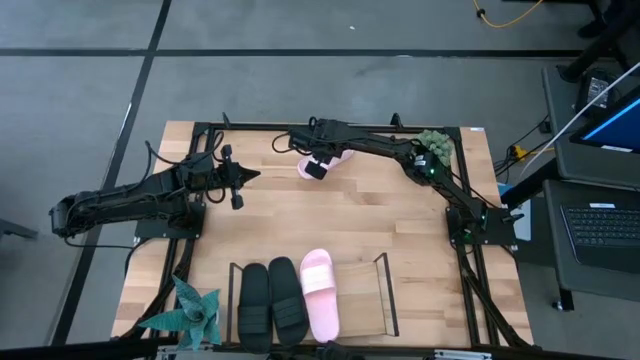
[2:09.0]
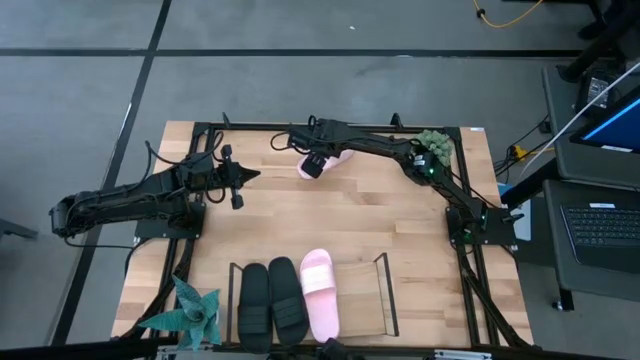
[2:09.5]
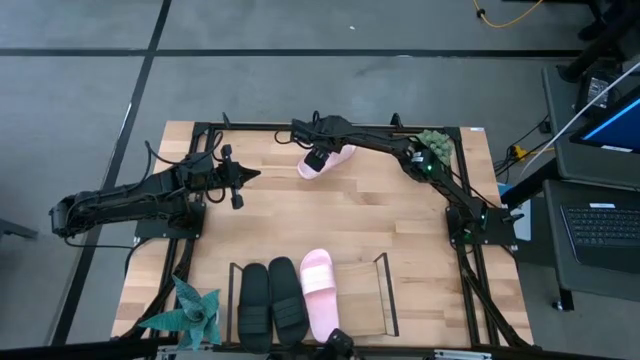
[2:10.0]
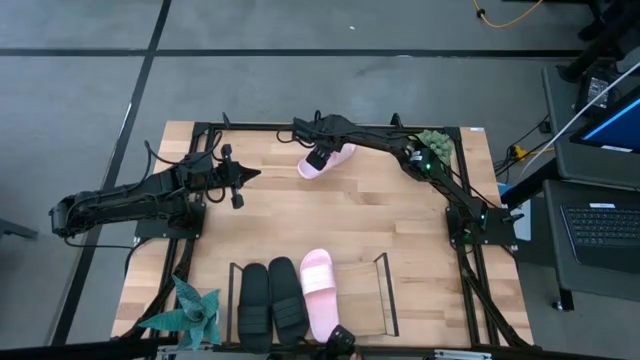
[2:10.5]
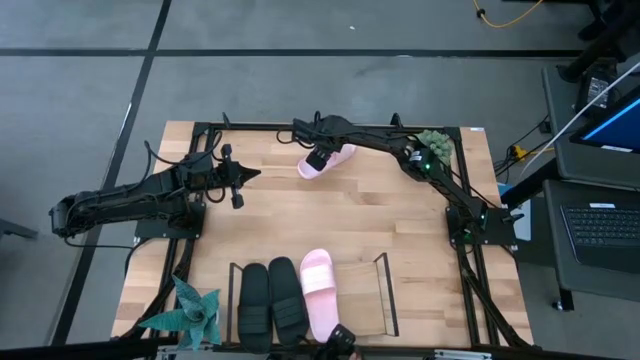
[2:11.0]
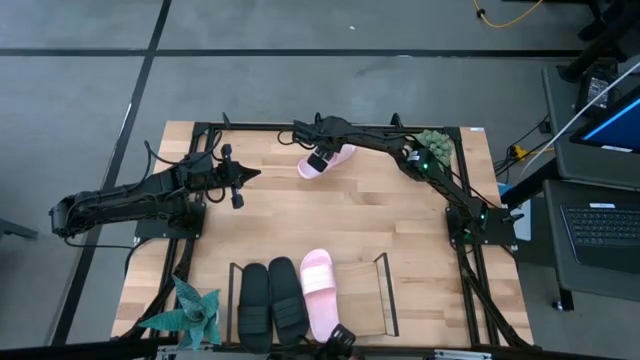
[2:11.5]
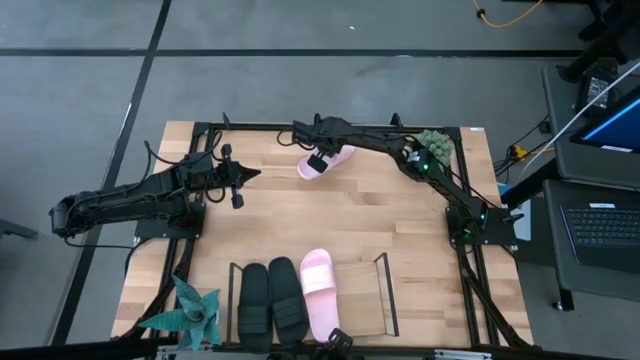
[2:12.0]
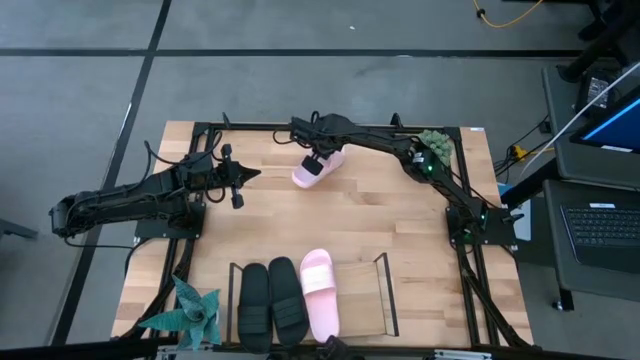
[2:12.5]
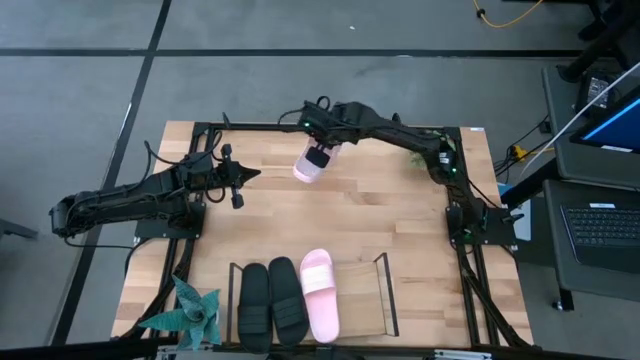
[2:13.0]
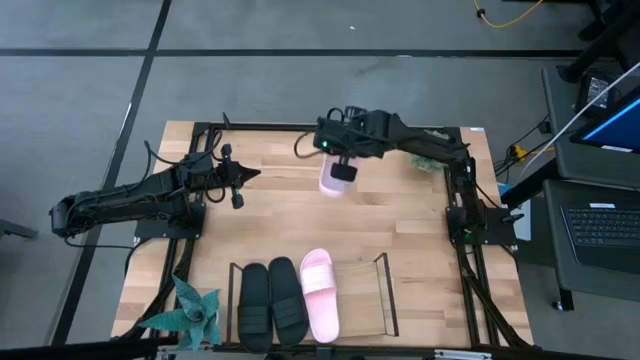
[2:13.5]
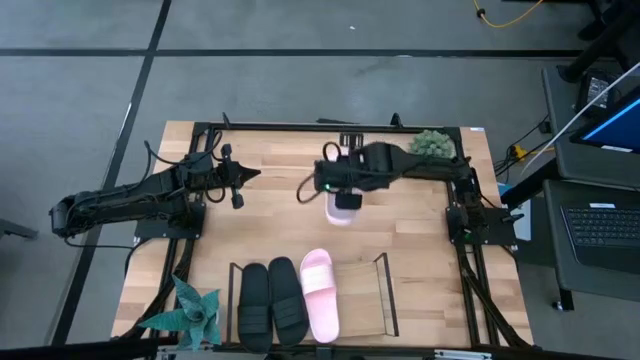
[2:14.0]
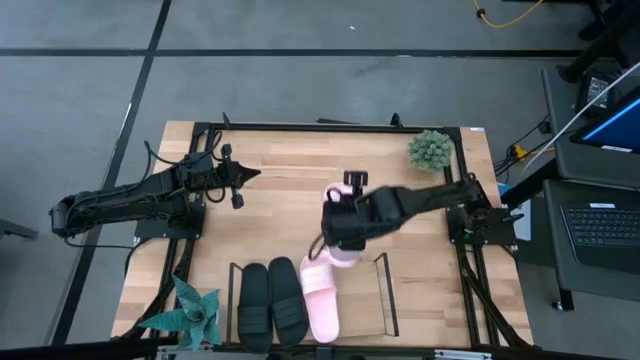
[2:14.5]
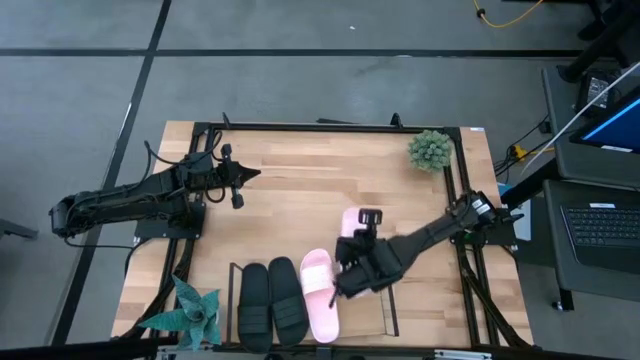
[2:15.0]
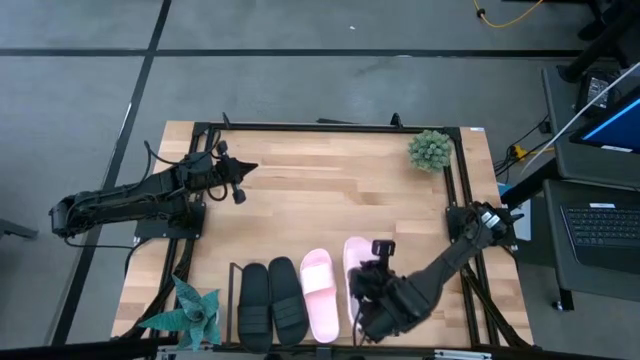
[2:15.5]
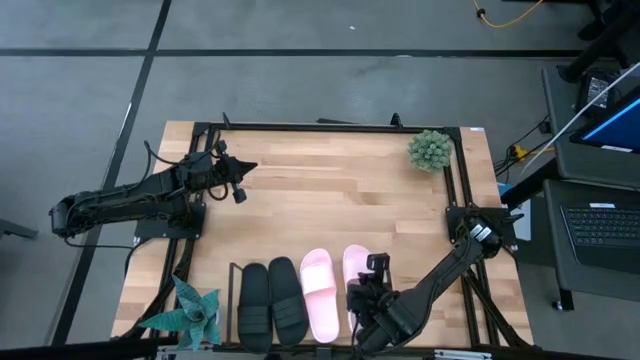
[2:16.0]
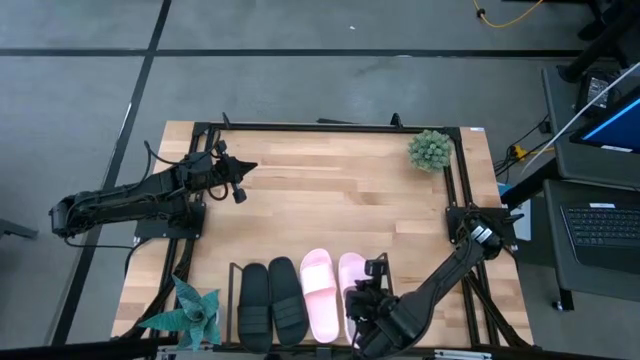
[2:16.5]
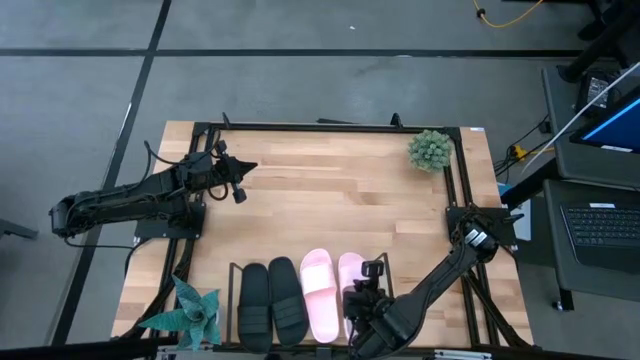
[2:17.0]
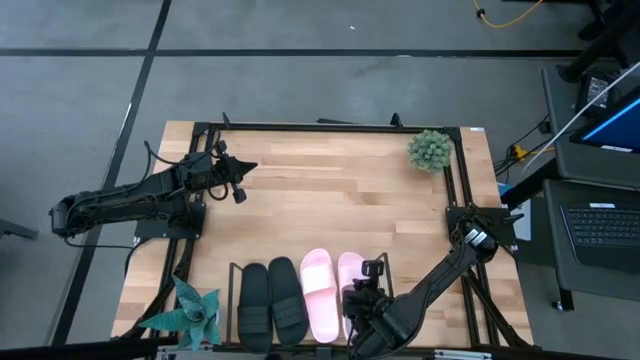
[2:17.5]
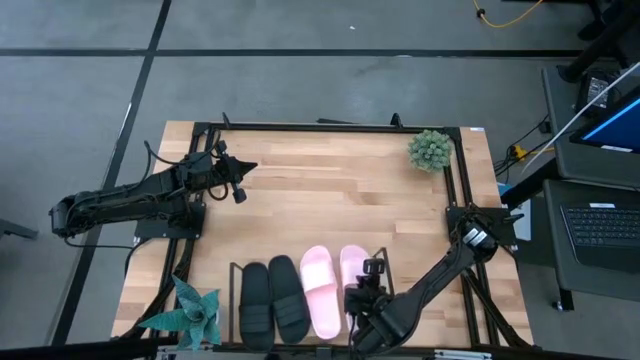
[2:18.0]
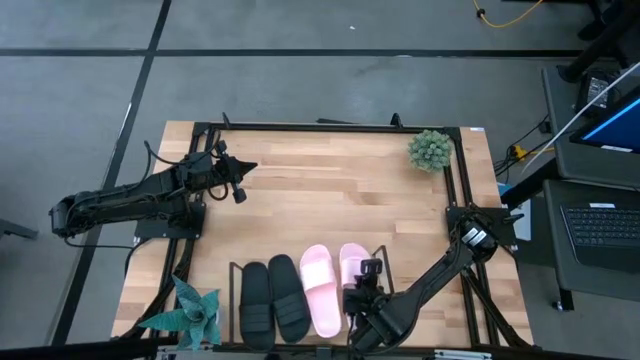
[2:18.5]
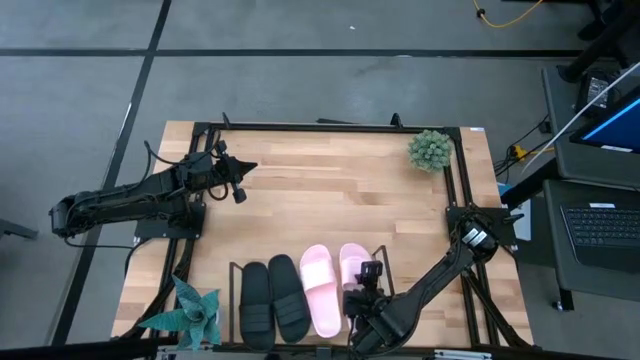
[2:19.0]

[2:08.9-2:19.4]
Task: Pick and place slides into the shelf
Put the pink slide on the shelf

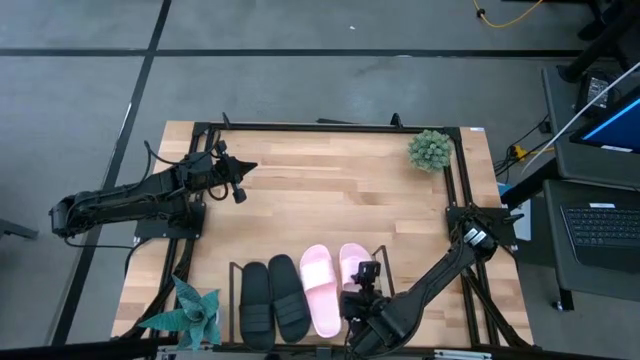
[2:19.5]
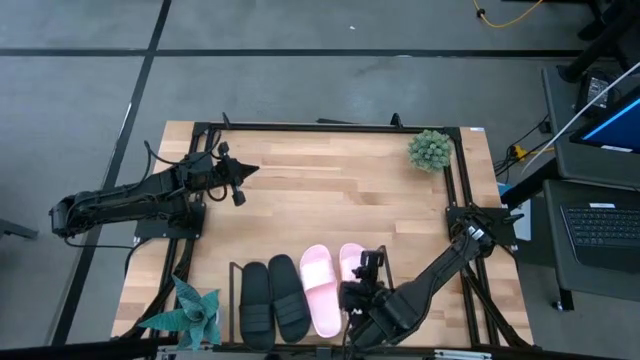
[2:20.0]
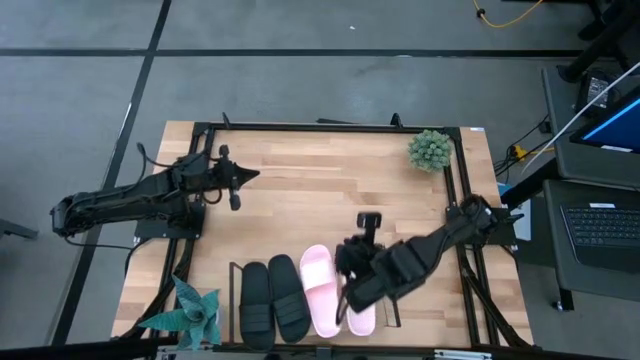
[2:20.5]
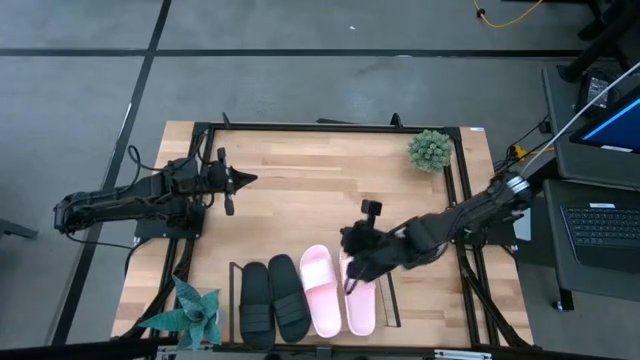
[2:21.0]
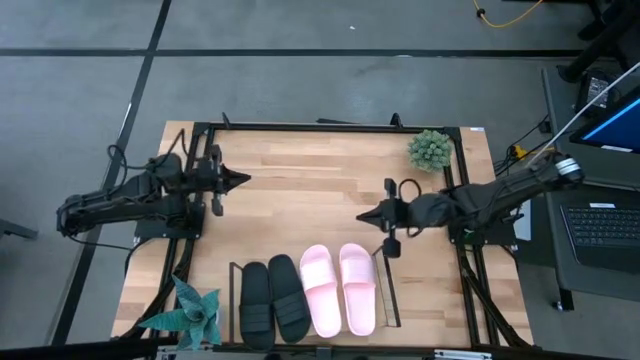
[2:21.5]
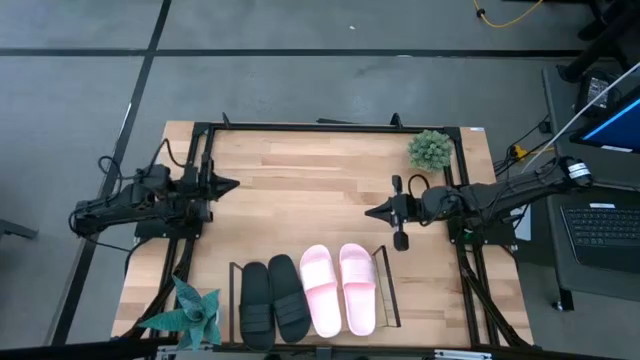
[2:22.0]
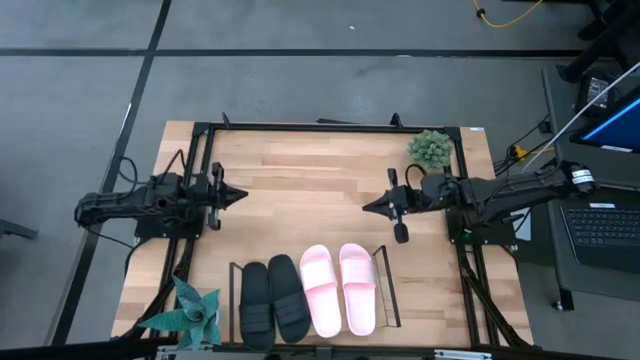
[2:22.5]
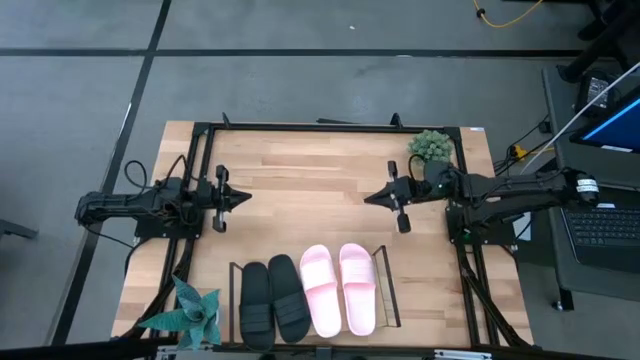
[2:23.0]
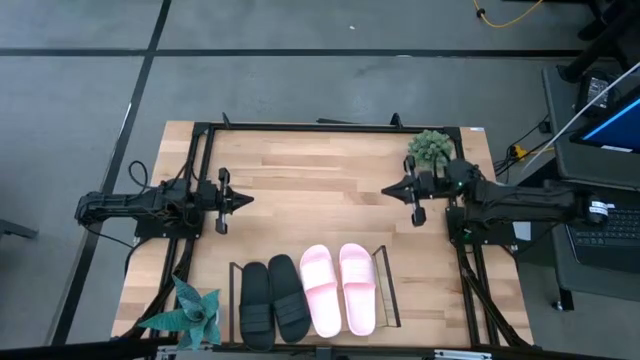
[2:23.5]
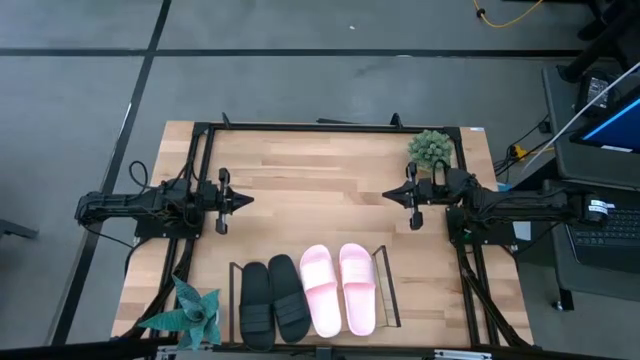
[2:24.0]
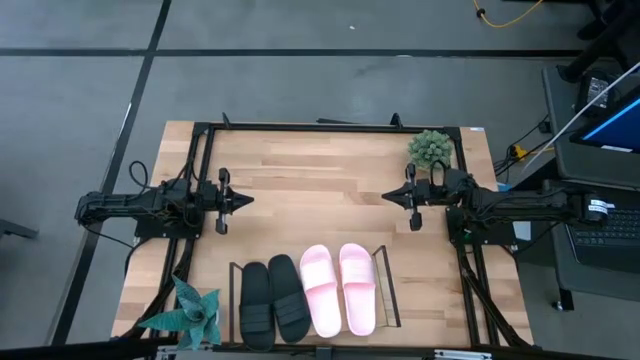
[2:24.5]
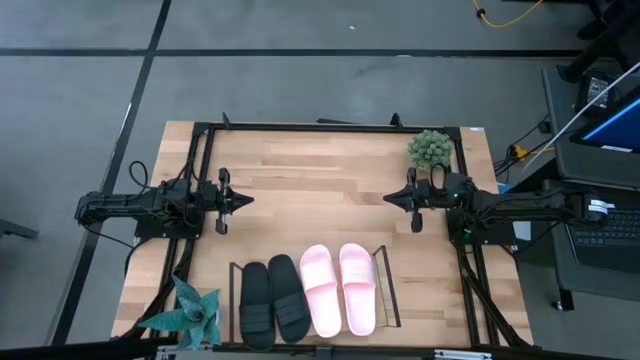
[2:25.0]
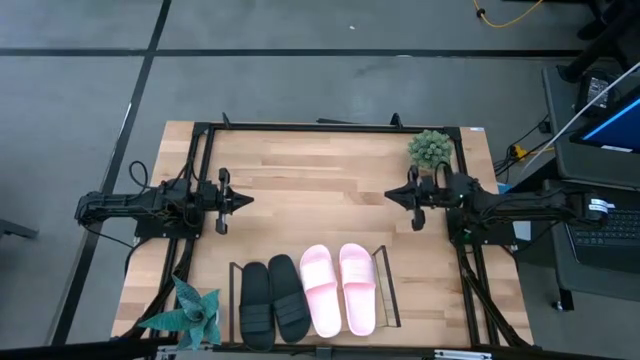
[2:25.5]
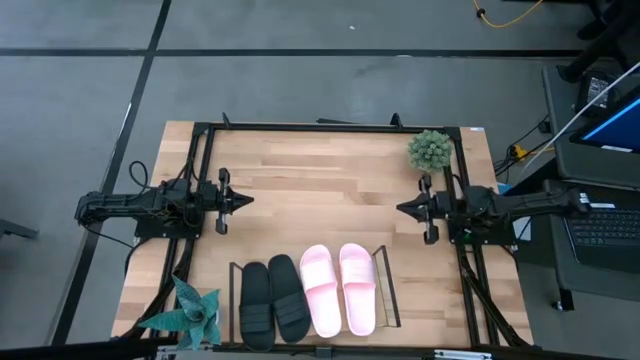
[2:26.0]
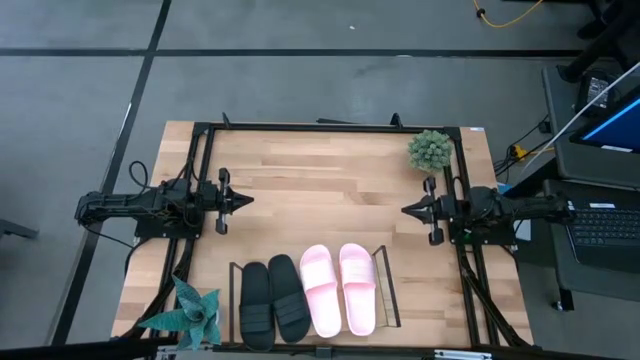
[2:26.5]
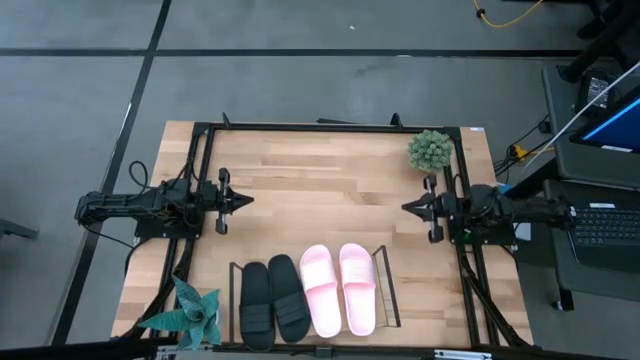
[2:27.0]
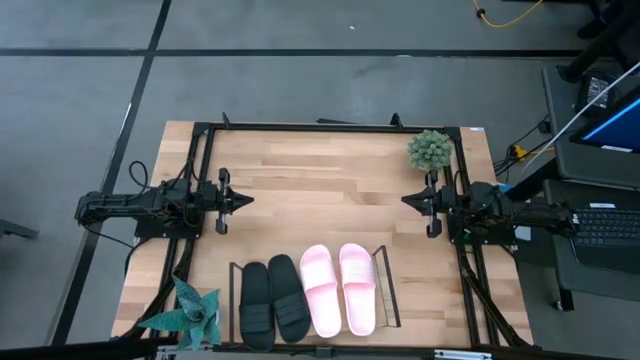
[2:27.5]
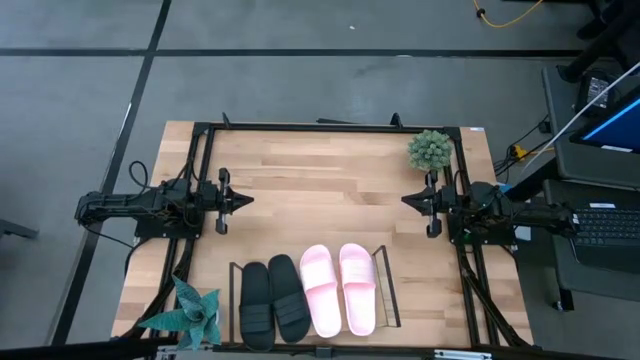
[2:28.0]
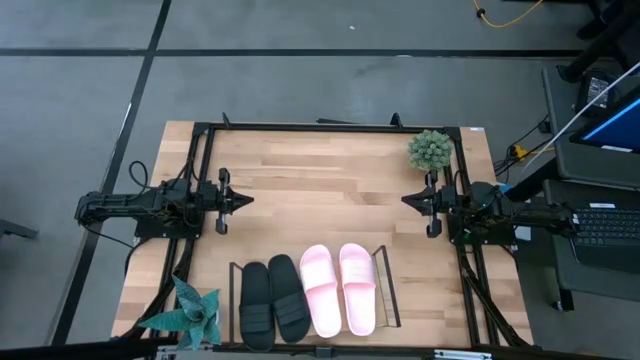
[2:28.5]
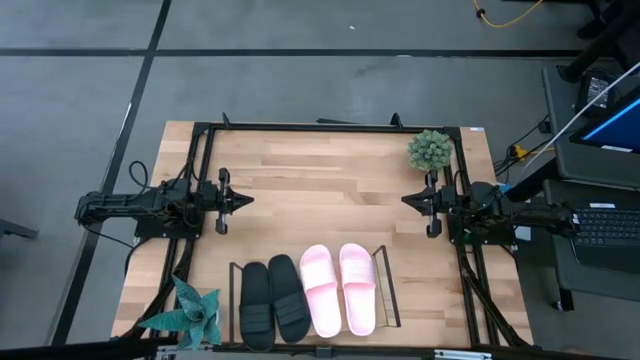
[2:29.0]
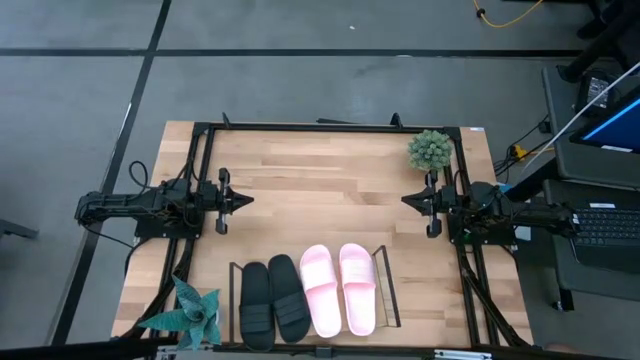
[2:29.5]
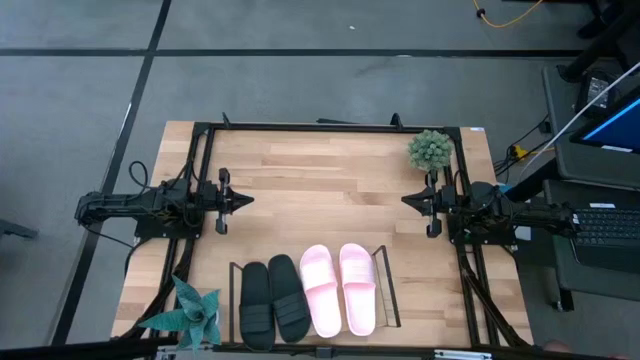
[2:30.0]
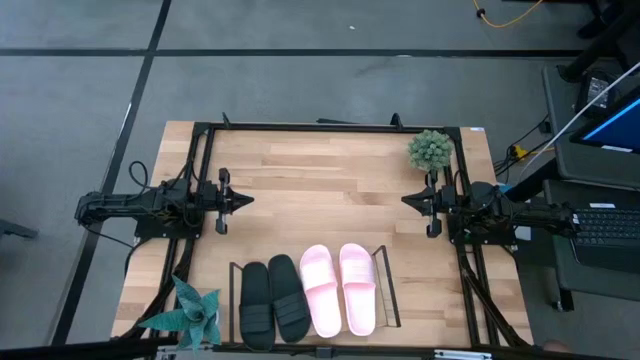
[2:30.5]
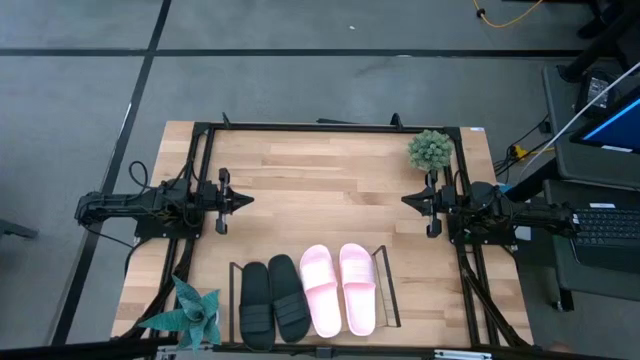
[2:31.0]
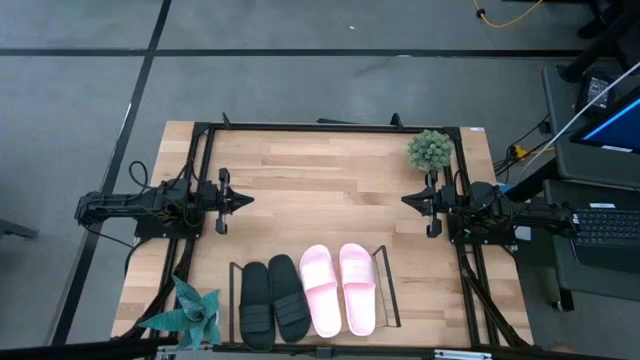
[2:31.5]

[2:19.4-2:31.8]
Return to Home Position
